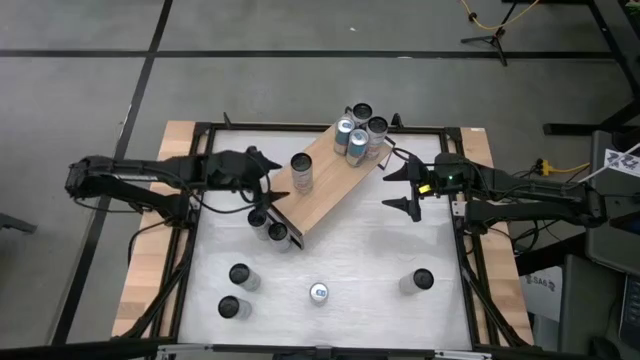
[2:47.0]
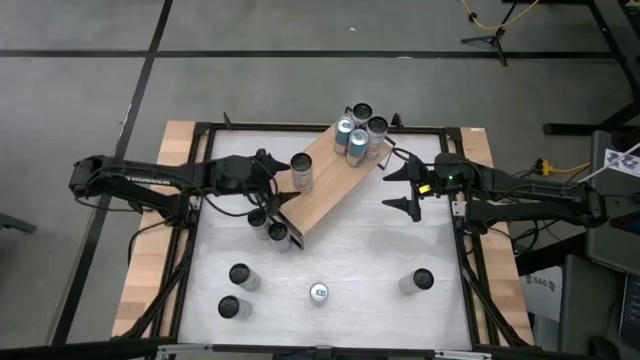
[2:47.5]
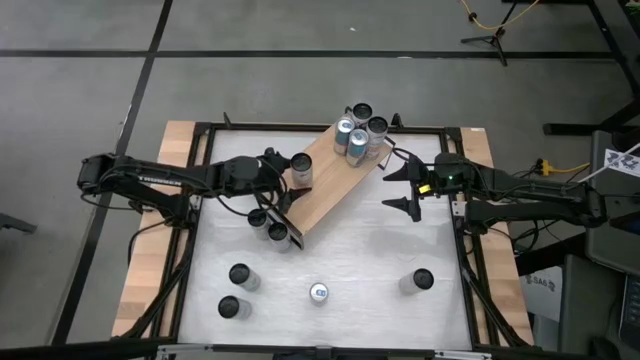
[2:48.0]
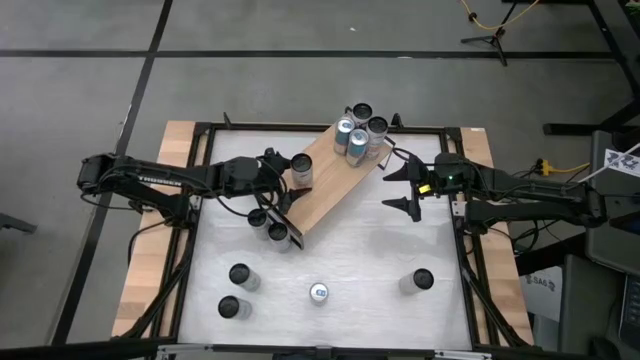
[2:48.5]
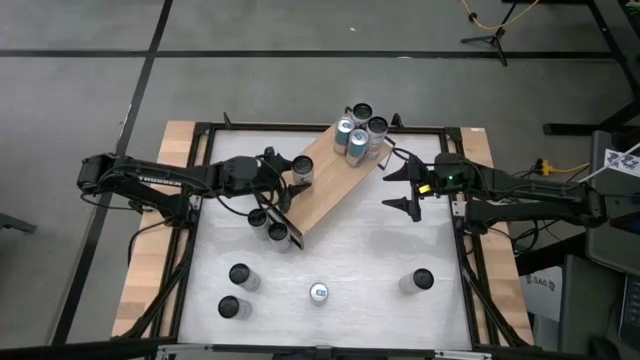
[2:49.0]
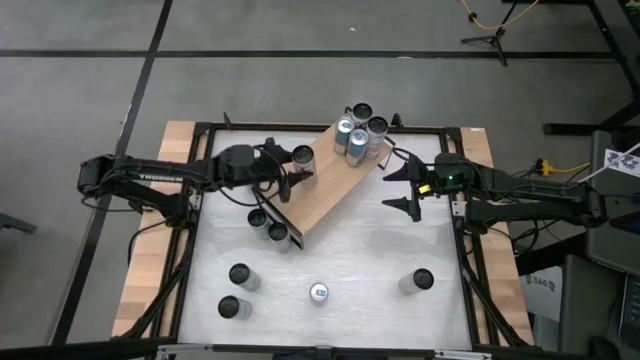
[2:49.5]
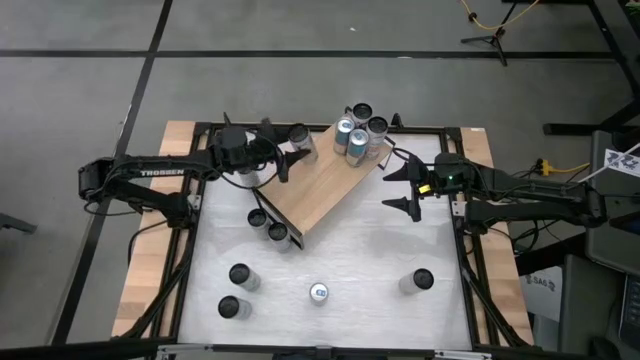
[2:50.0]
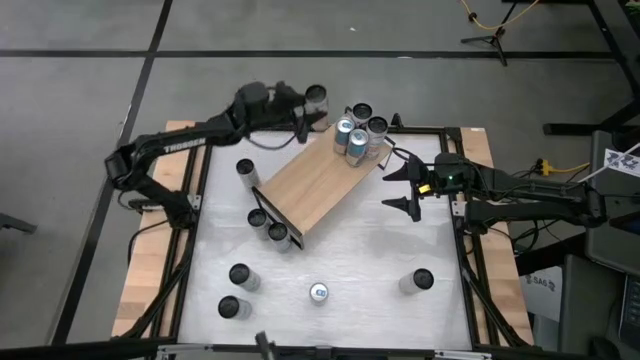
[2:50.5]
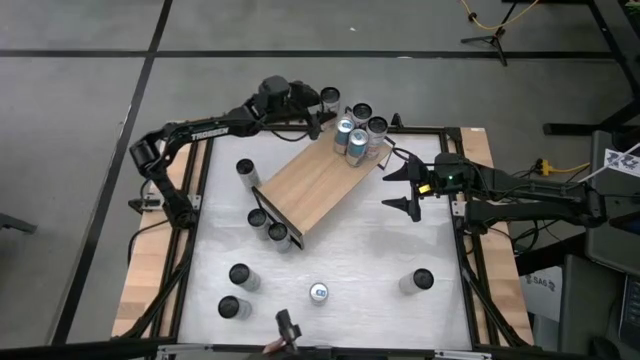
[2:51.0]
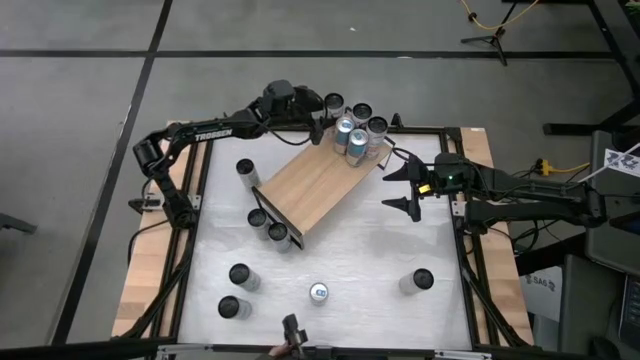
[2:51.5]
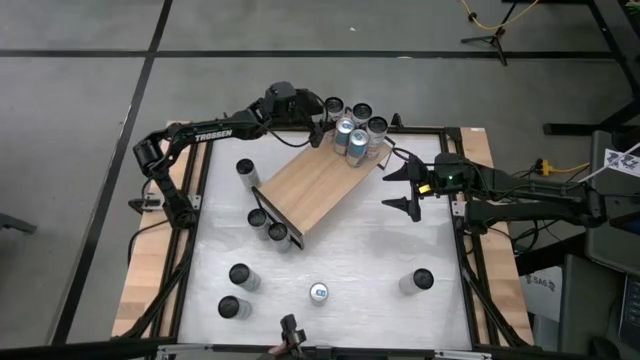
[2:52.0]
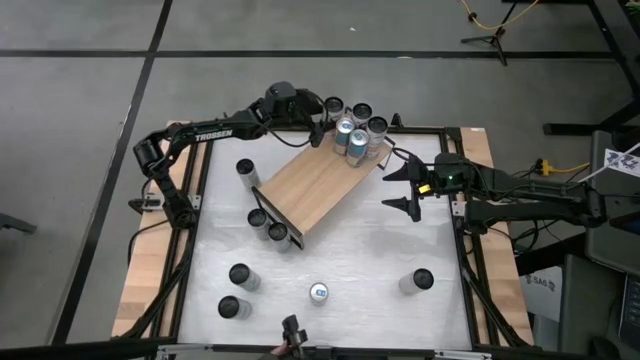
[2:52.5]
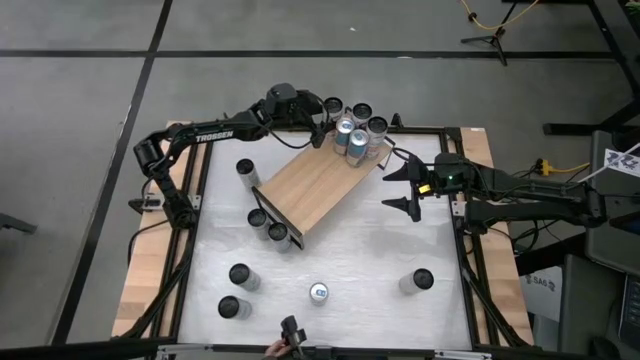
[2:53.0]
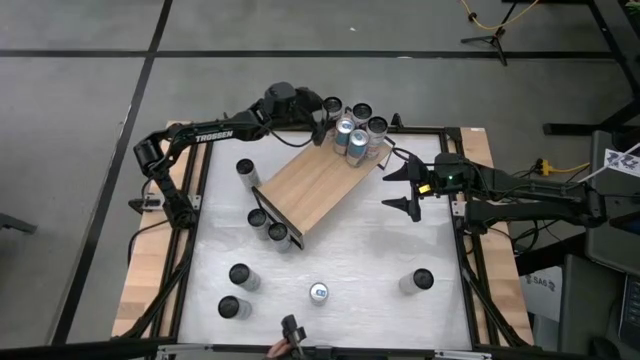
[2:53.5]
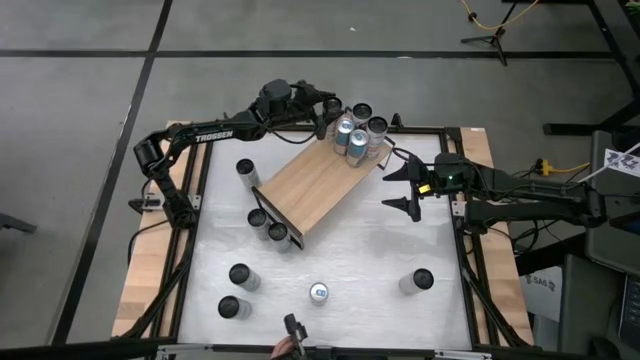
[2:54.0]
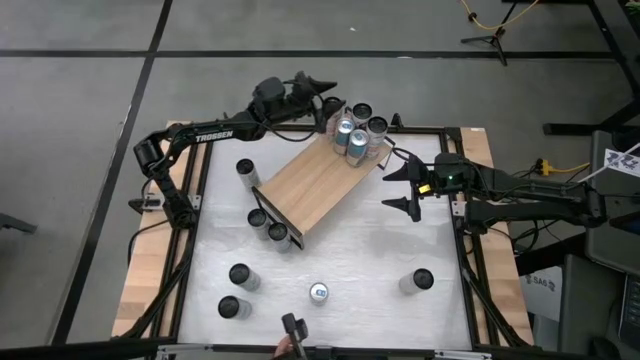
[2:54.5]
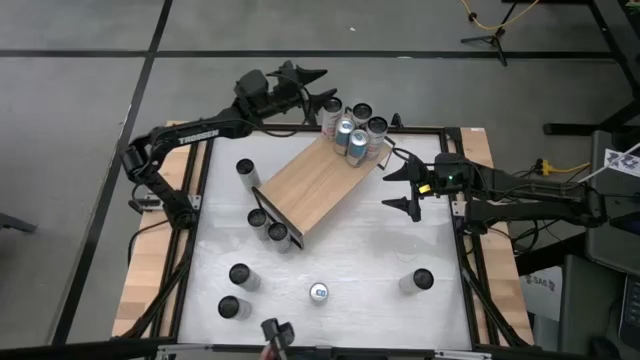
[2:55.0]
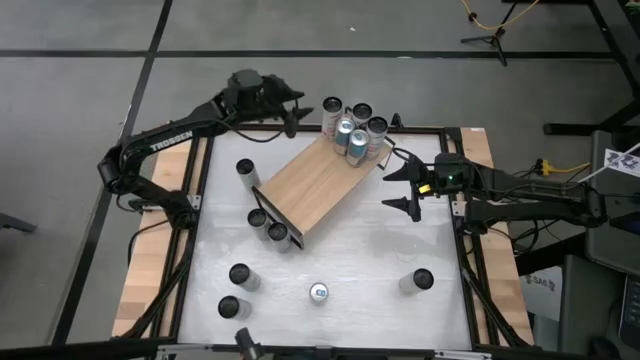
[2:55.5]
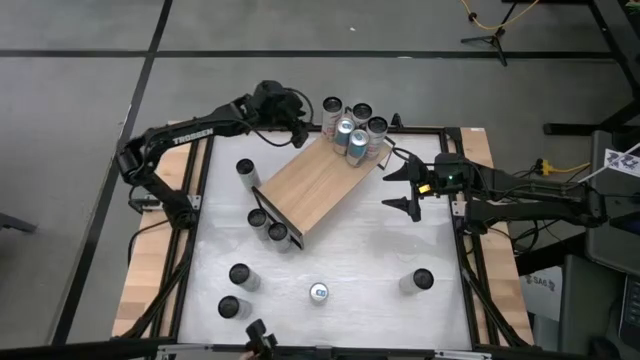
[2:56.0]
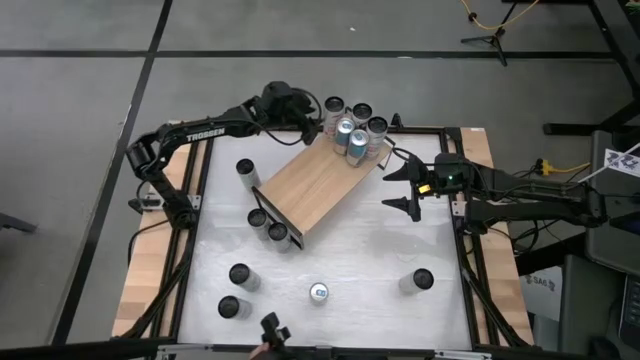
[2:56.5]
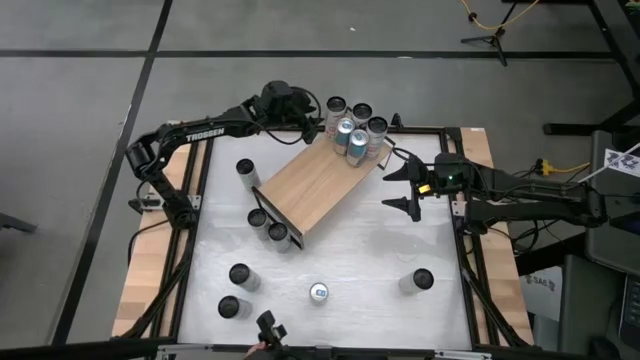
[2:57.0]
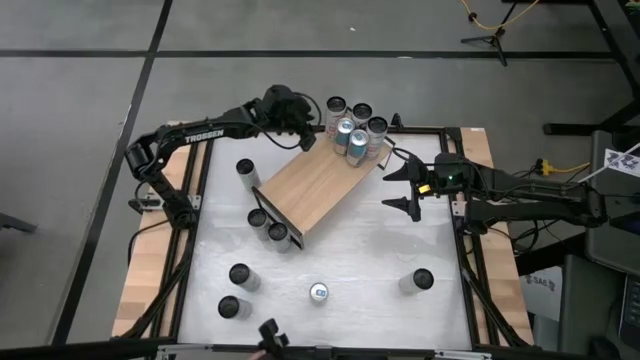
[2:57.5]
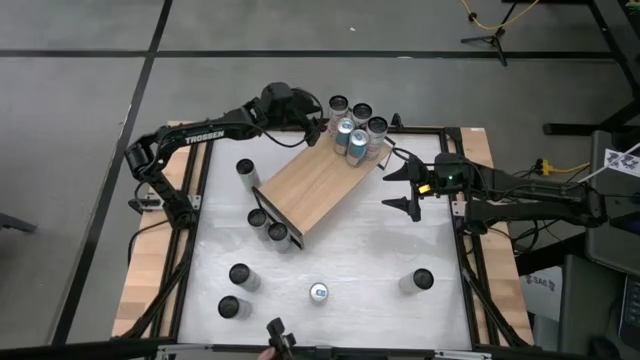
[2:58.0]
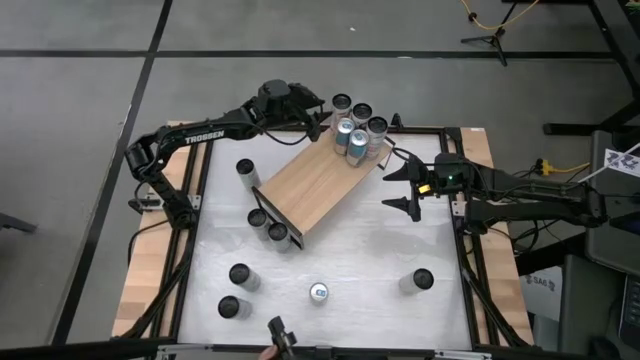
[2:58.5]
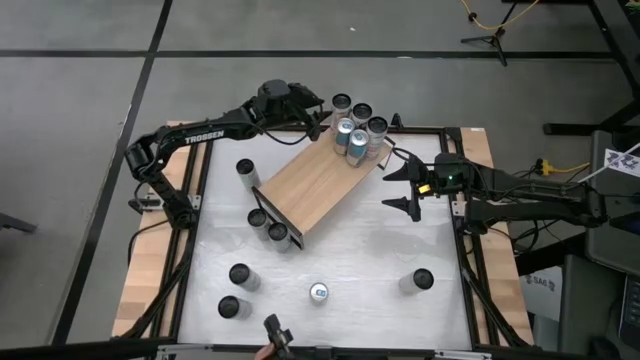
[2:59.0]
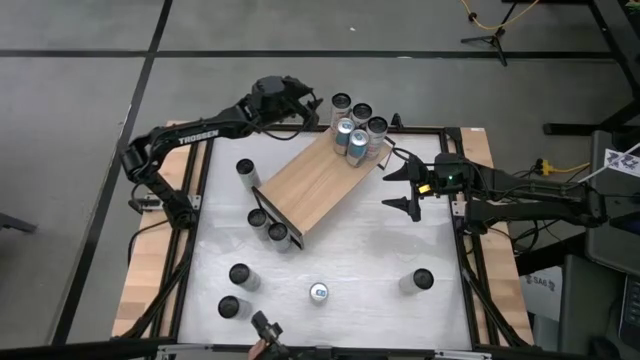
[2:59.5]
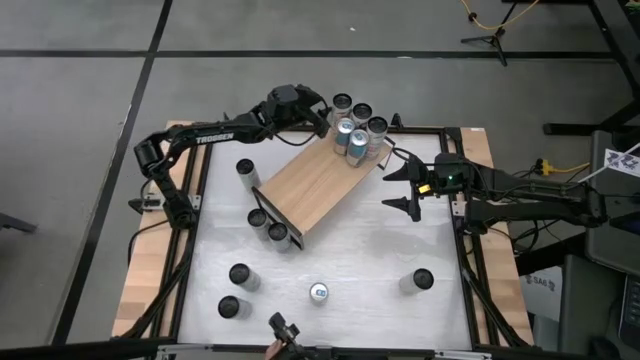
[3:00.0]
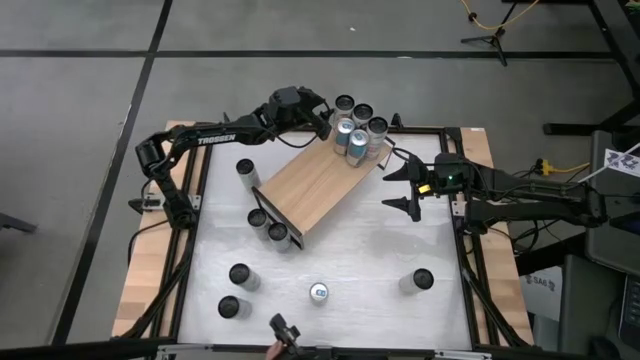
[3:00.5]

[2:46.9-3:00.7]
Task: Place canned beverage on shelf
Put the white-pink soda can on the shelf aligned with the other white-pink soda cans

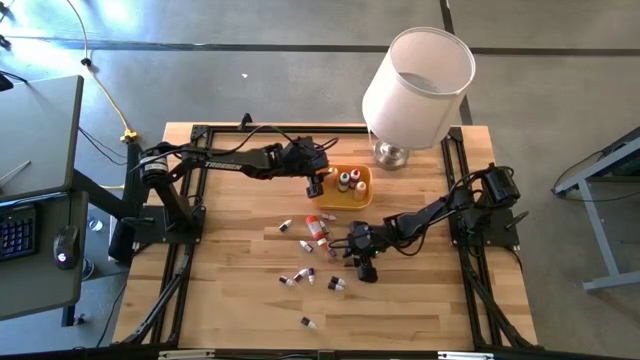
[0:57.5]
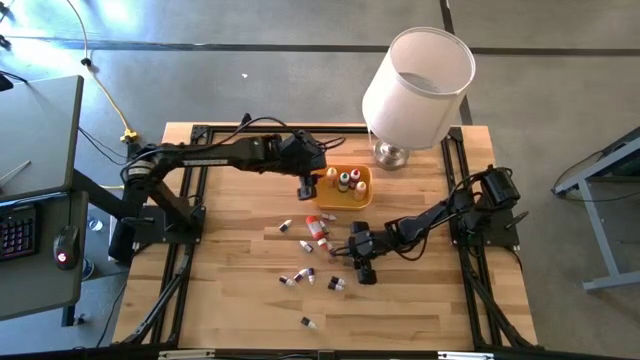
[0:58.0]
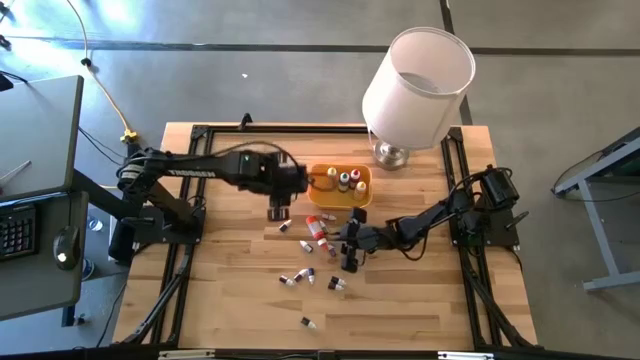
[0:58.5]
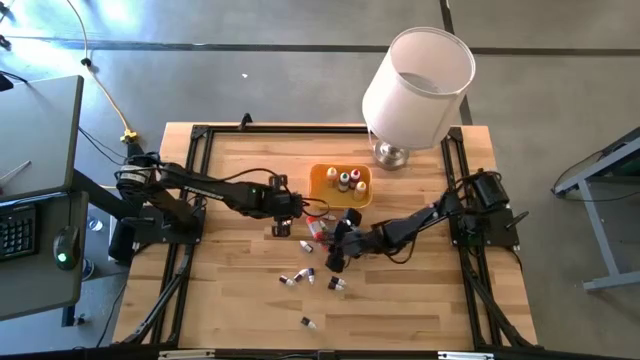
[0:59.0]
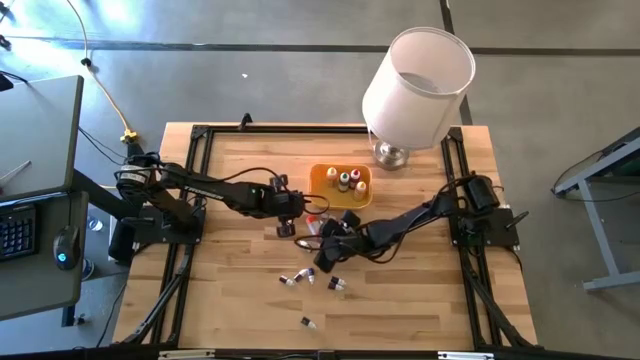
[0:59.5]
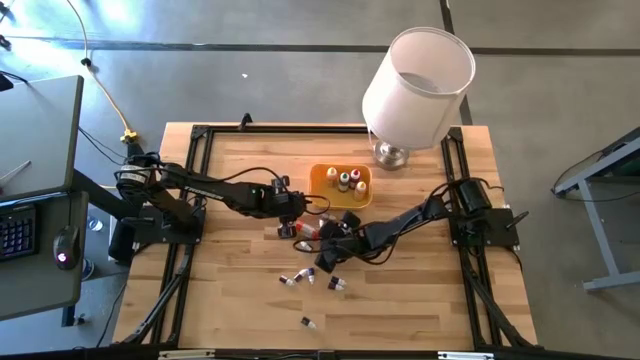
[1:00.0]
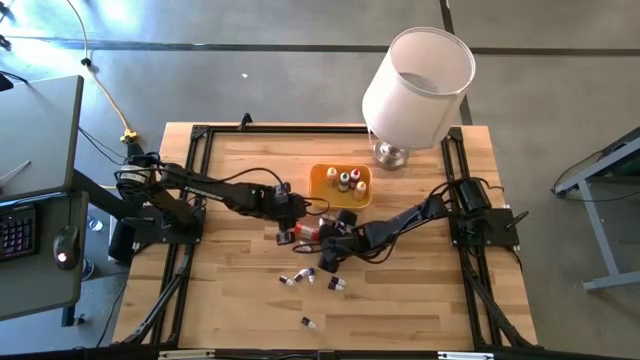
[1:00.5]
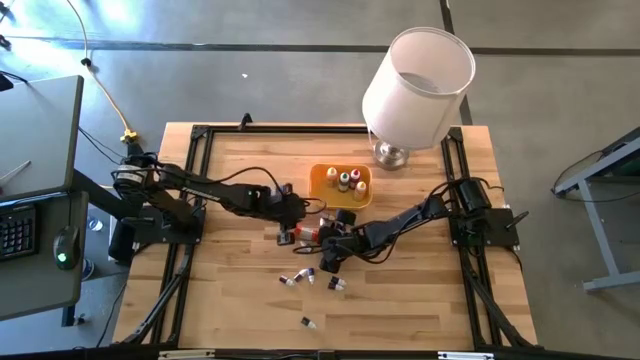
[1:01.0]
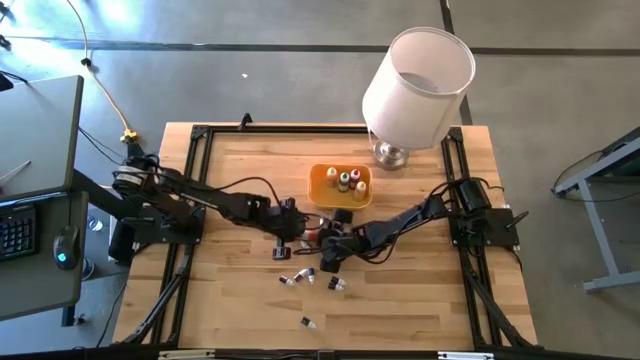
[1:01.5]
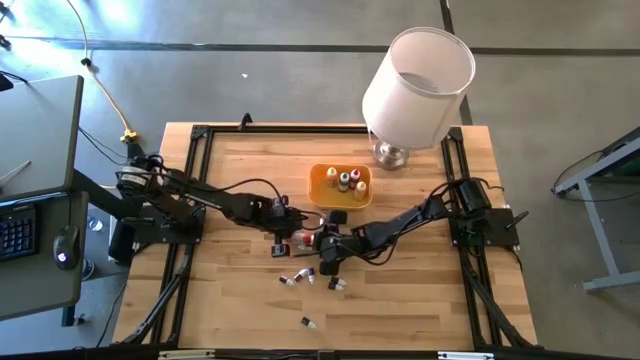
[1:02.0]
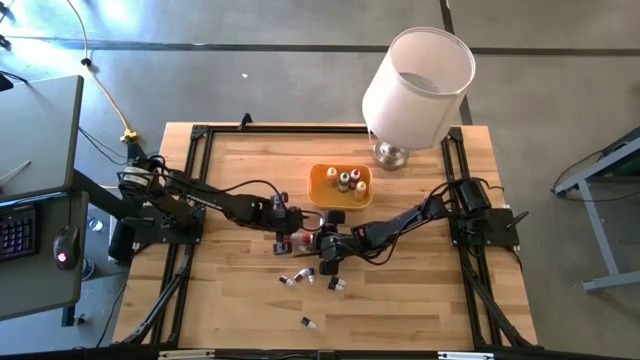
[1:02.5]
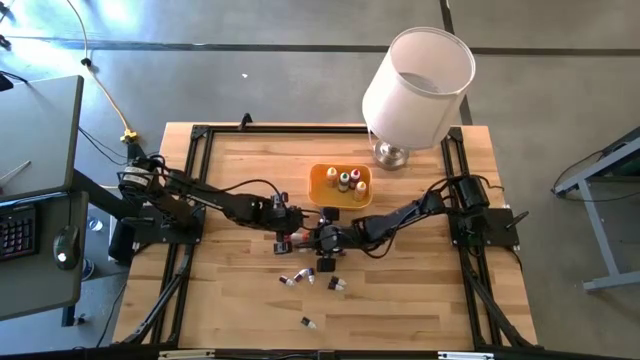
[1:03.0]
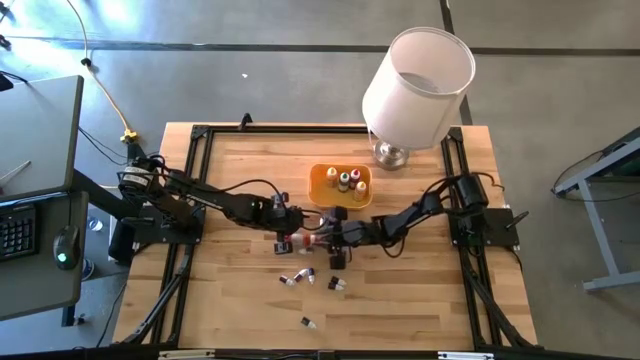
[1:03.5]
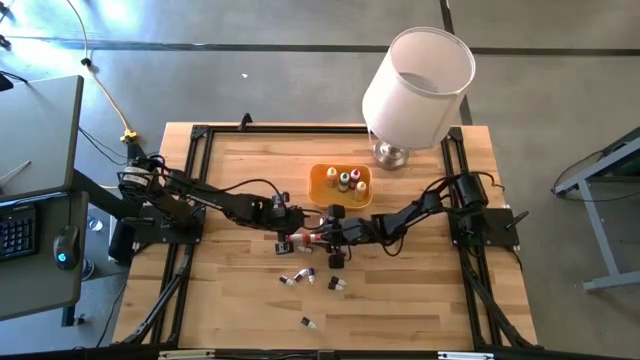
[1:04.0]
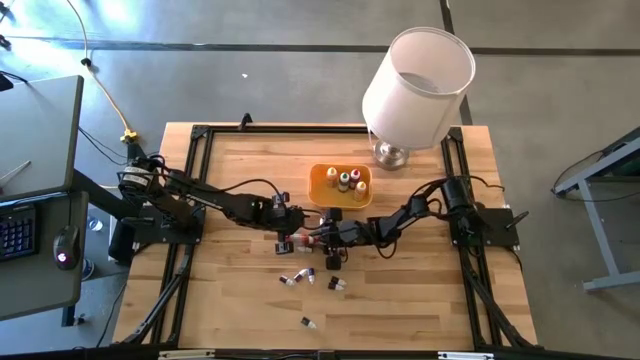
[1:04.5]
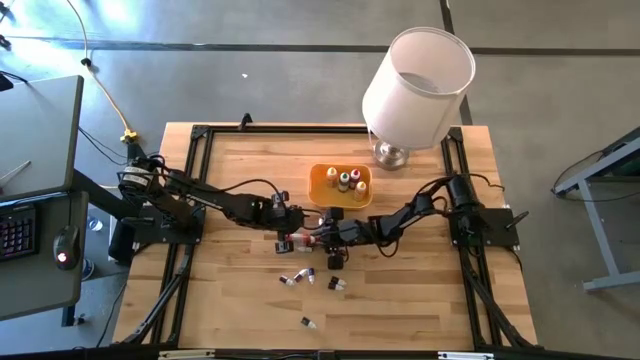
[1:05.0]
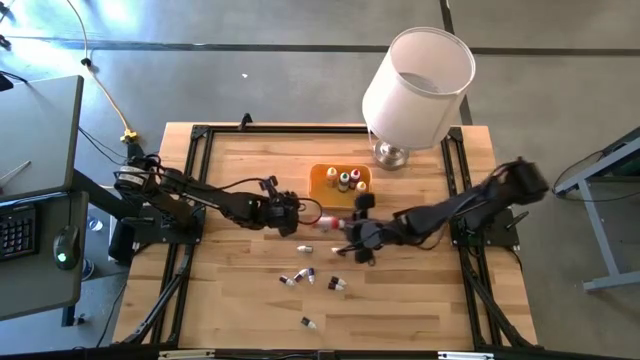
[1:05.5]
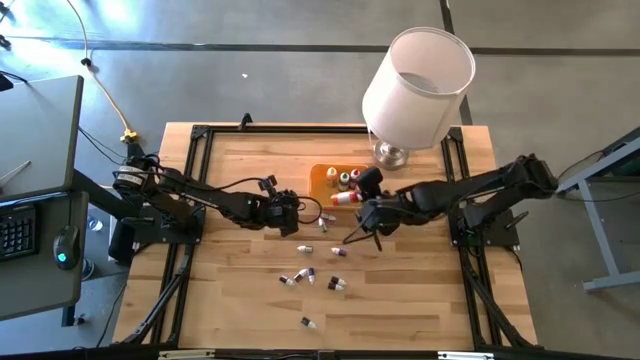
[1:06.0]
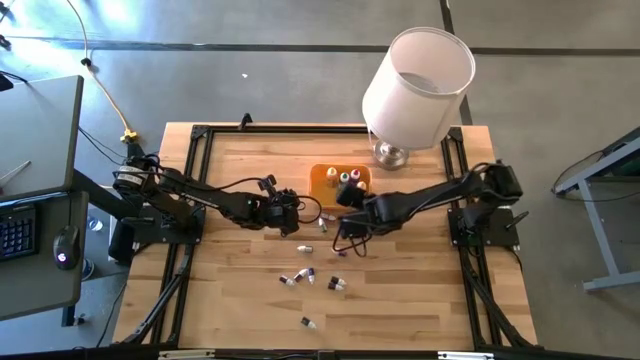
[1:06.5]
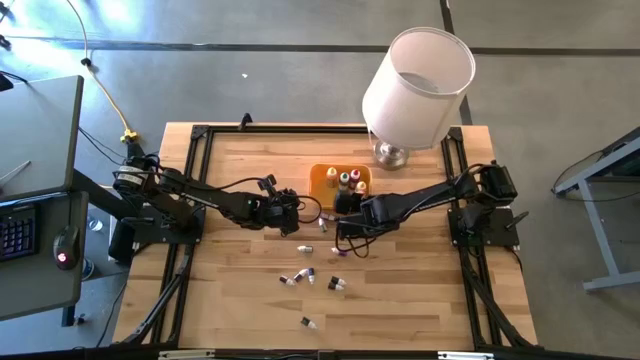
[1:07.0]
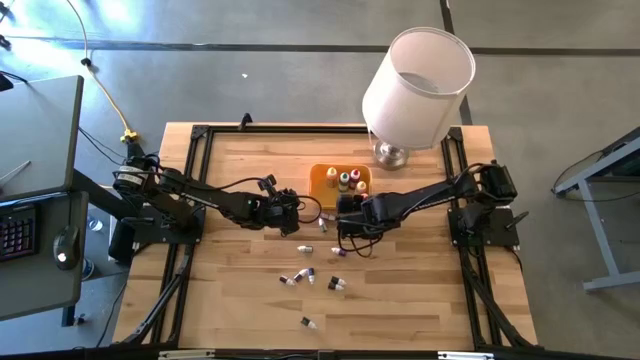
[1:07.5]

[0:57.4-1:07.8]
Task: Pick & Place food coloring
Put the large orange food coloring bottle into the yellow container
